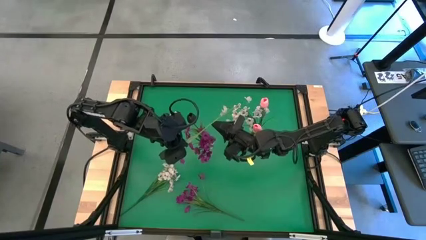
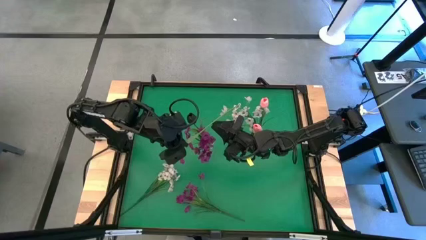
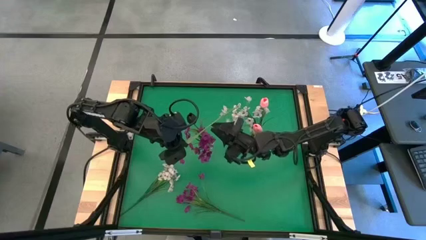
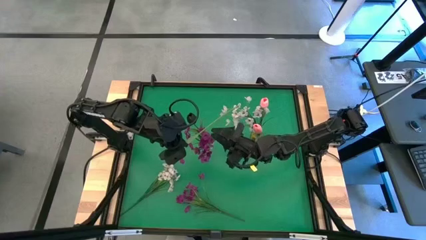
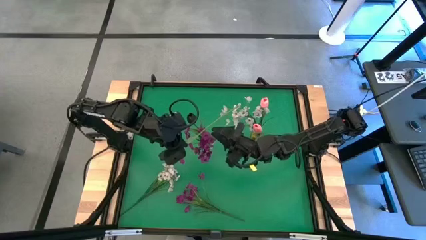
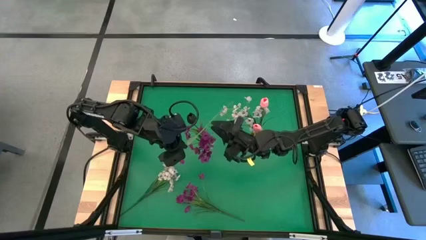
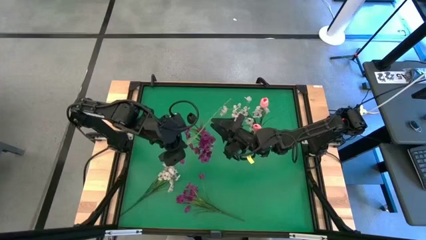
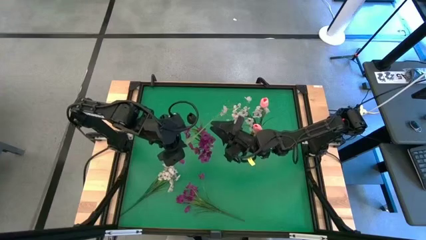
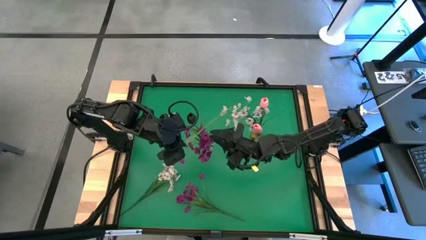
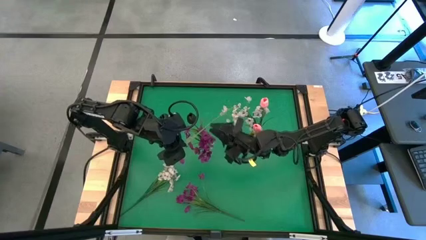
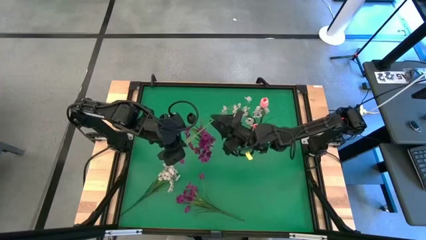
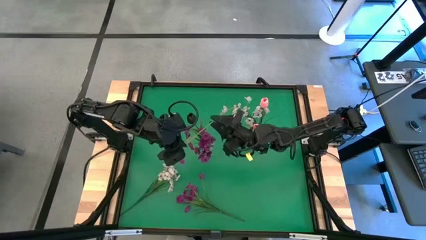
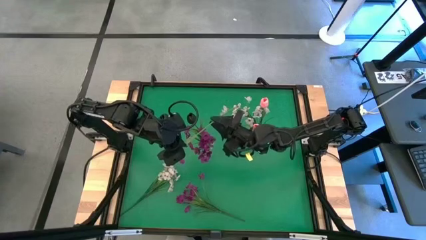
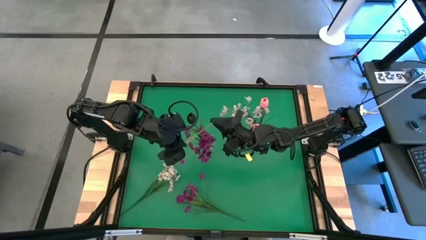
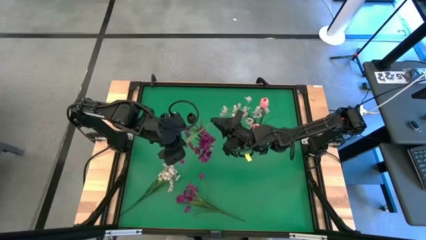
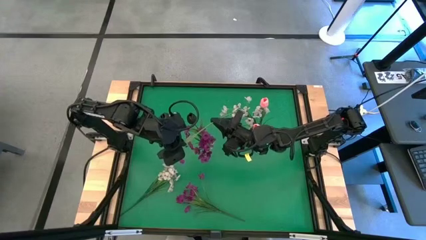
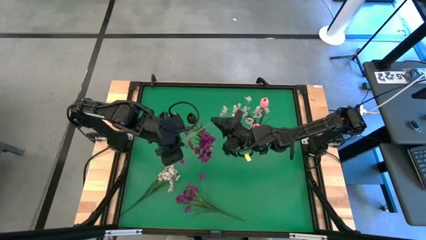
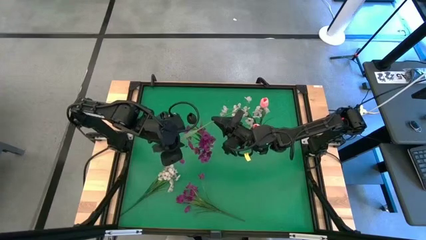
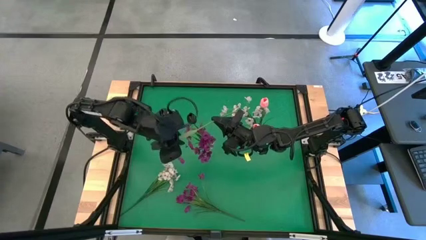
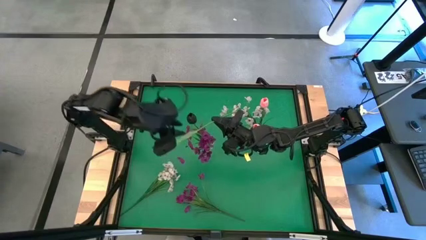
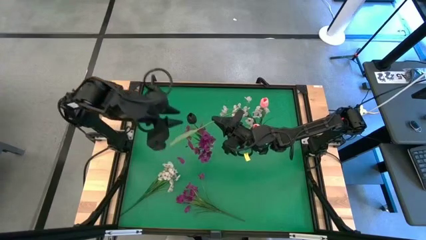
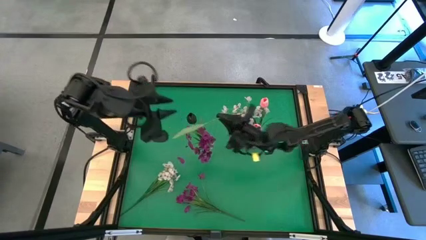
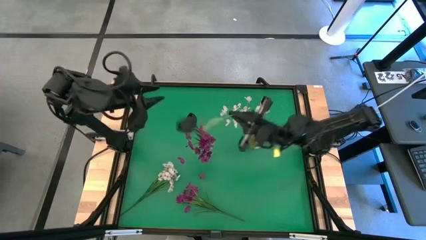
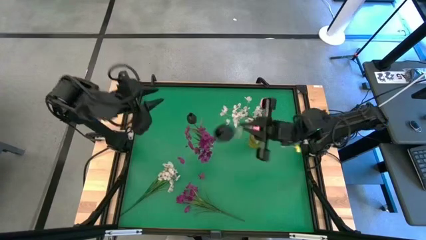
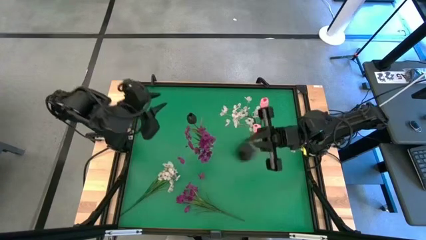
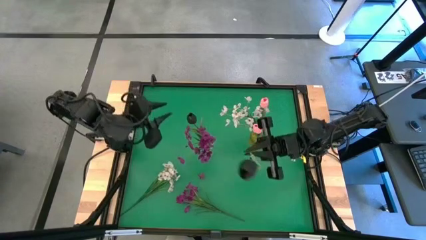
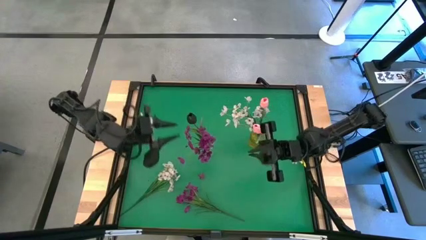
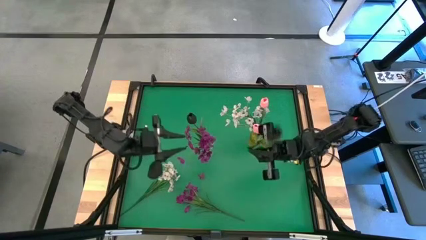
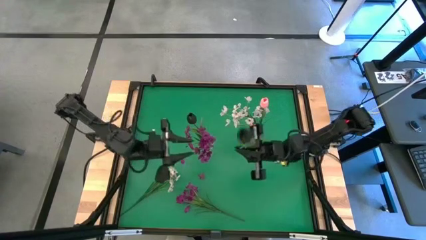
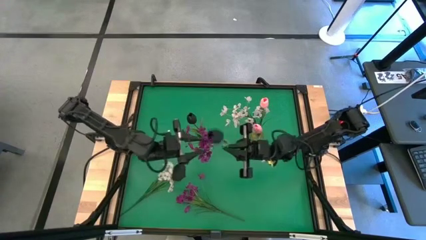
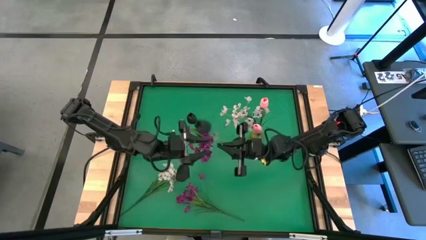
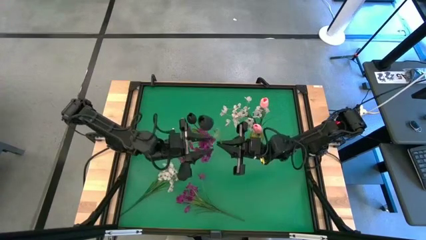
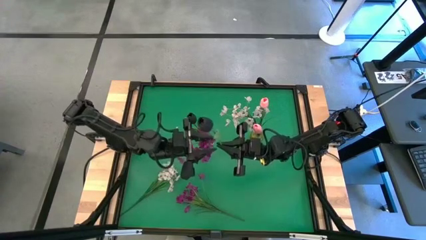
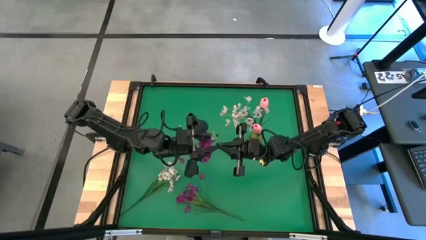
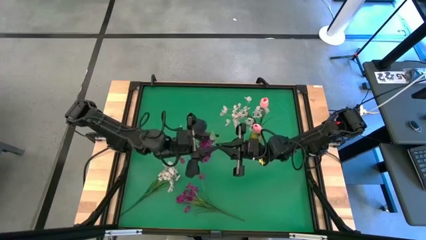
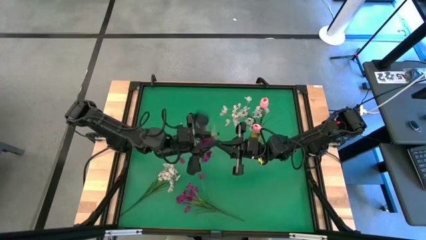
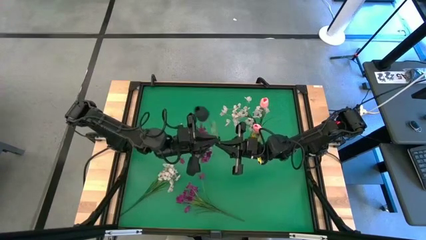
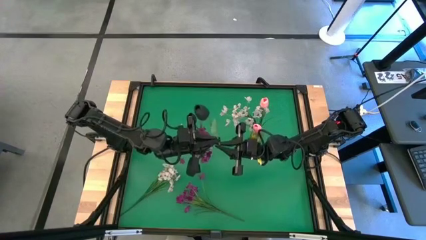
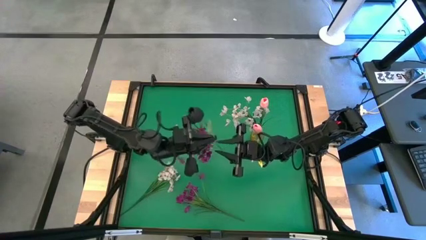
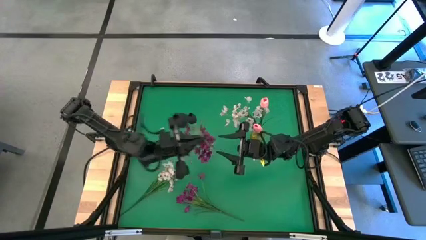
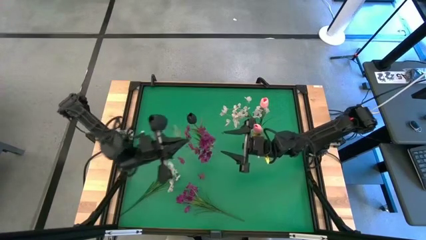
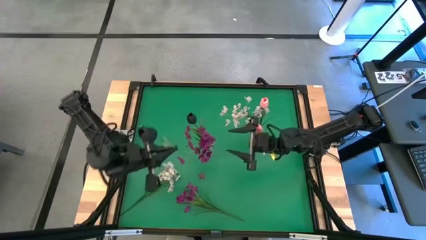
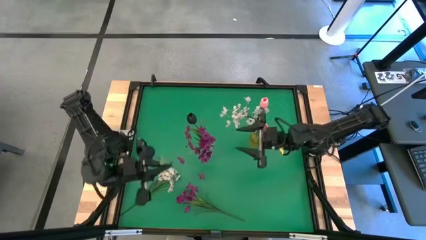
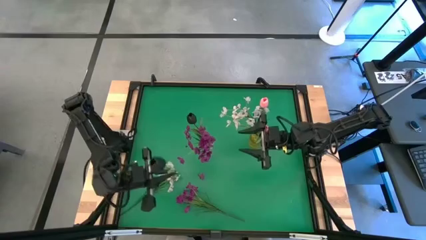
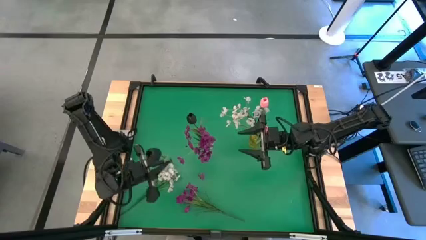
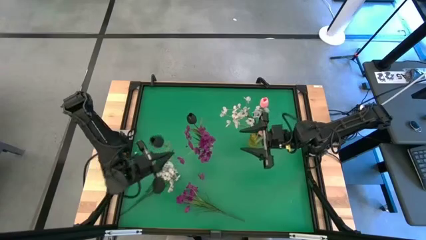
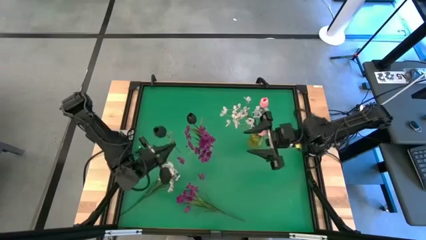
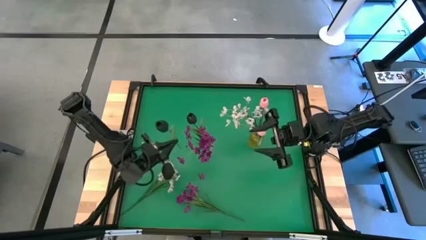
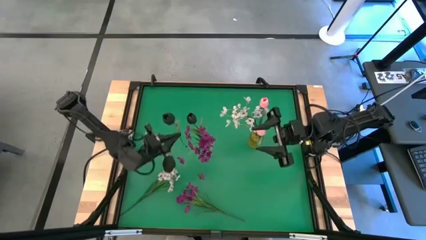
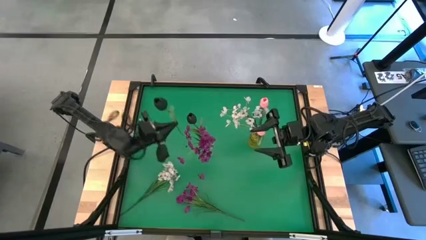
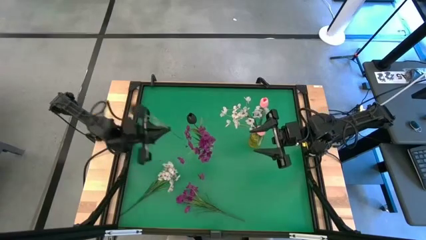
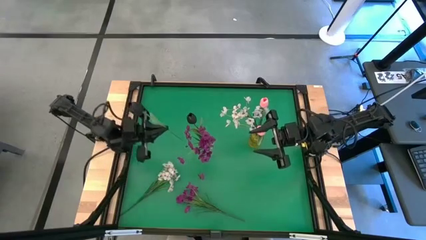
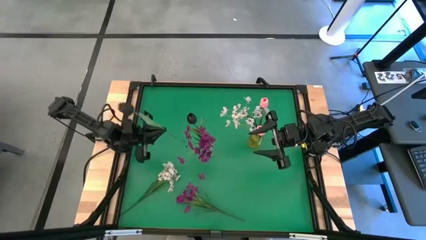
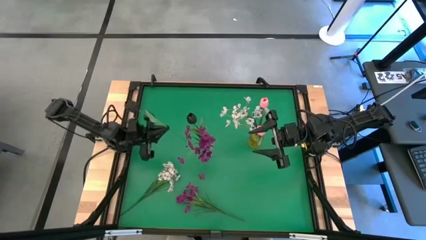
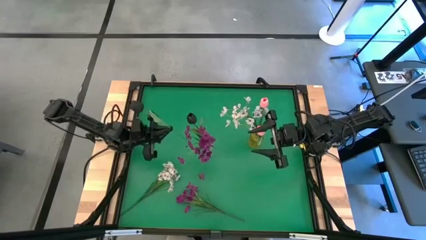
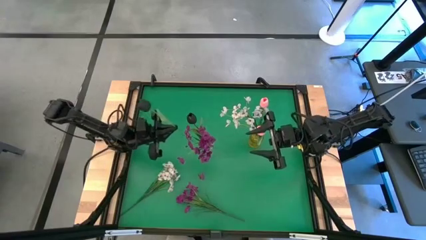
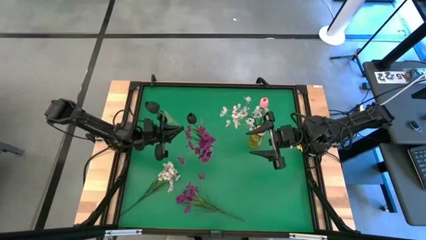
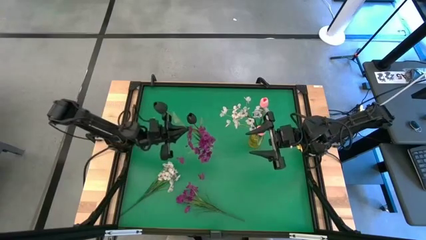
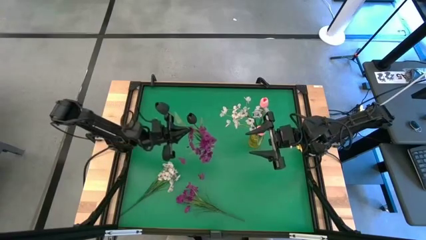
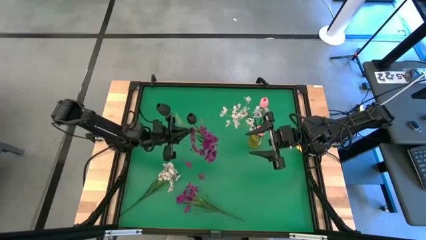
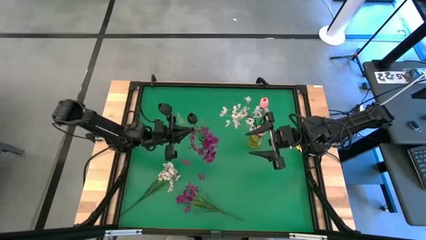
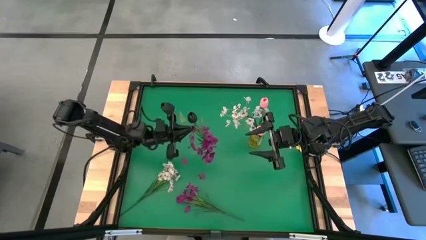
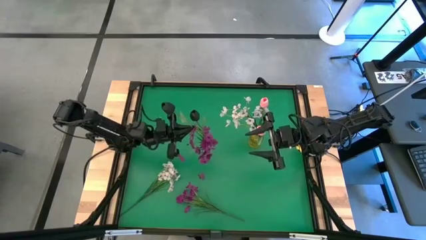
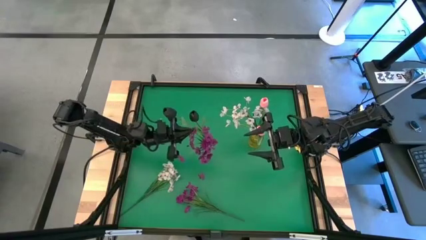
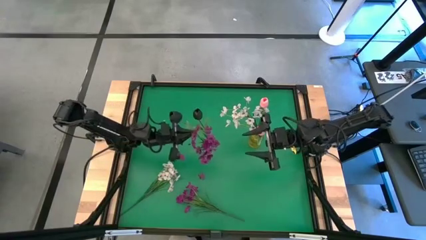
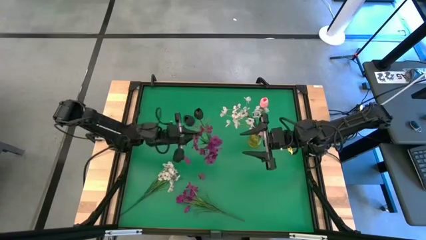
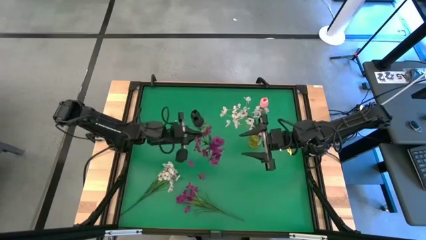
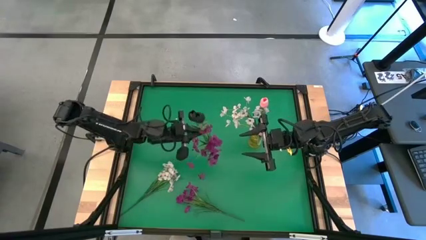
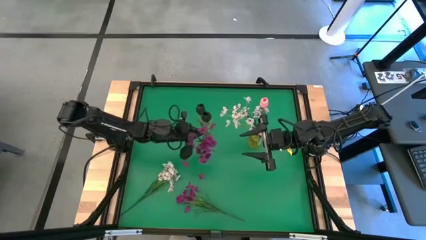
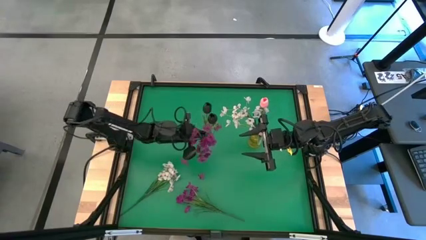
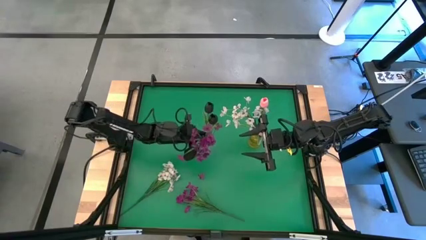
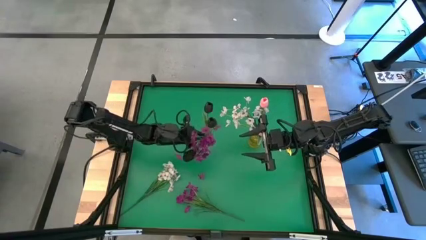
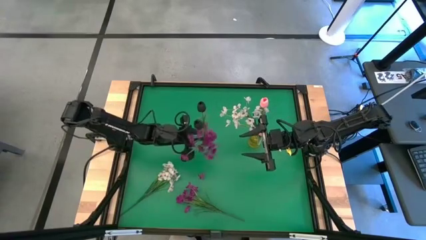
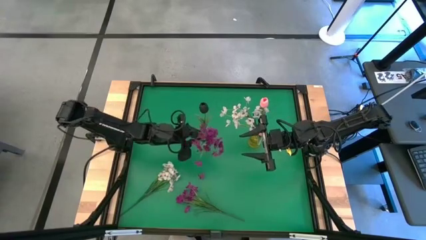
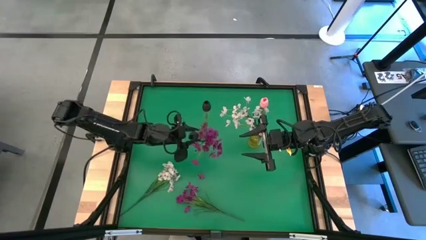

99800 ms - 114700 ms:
Task: Sort flowers into vase by color
Put the black tulip into the transparent vase
